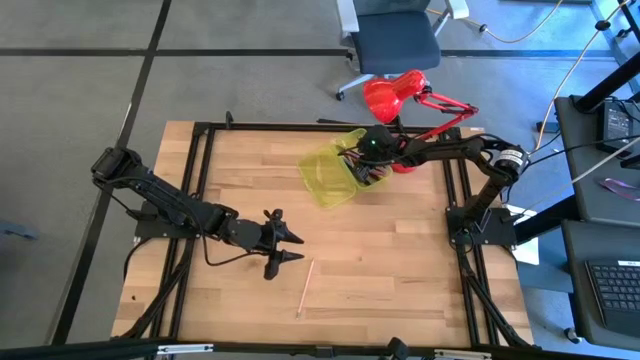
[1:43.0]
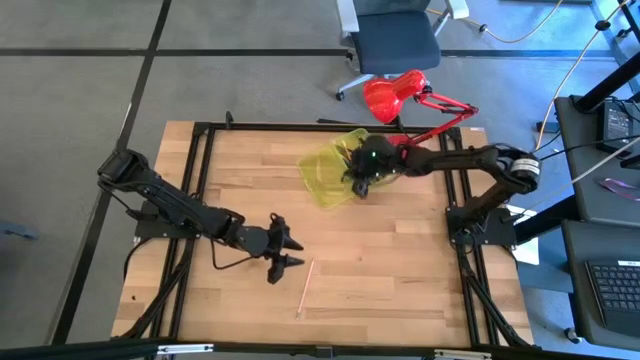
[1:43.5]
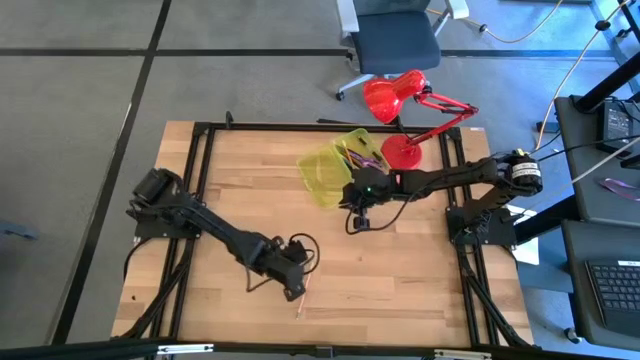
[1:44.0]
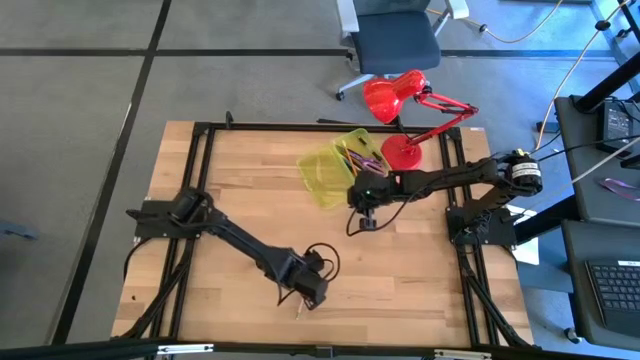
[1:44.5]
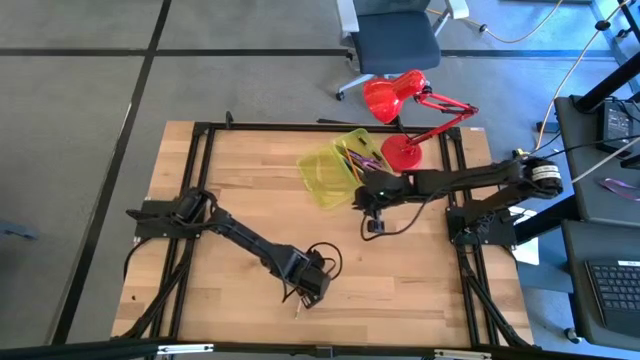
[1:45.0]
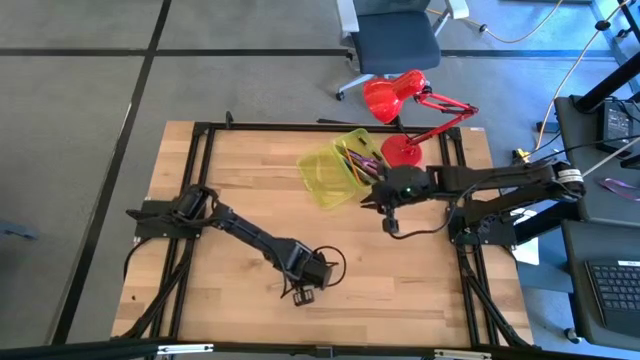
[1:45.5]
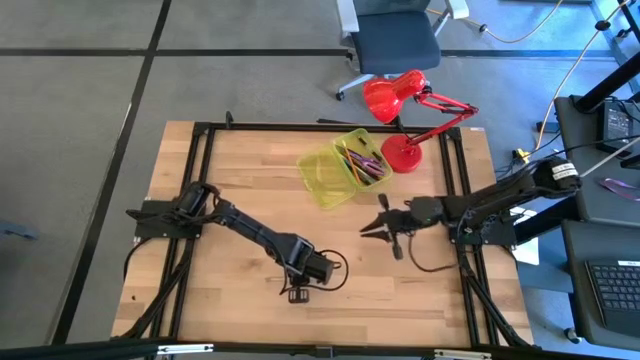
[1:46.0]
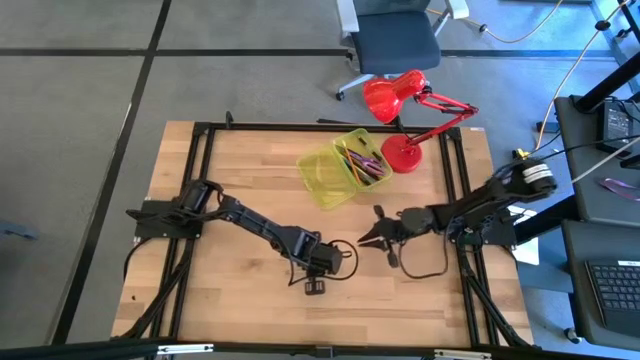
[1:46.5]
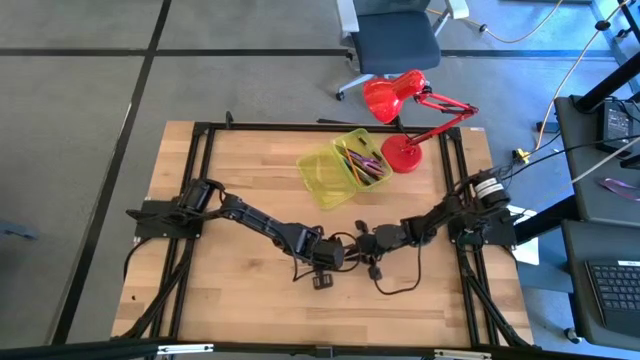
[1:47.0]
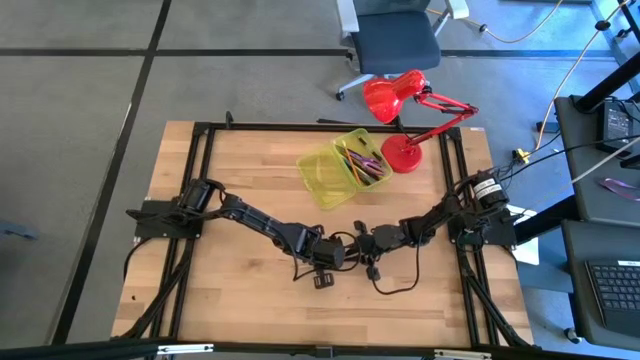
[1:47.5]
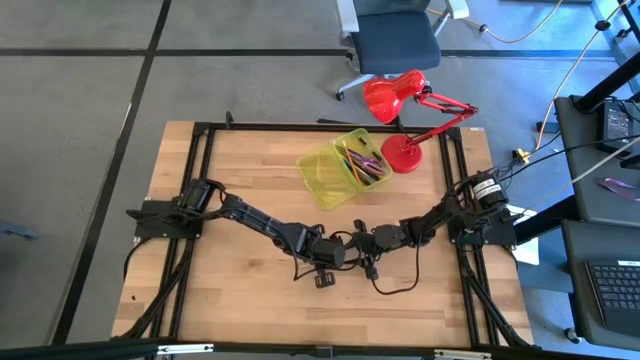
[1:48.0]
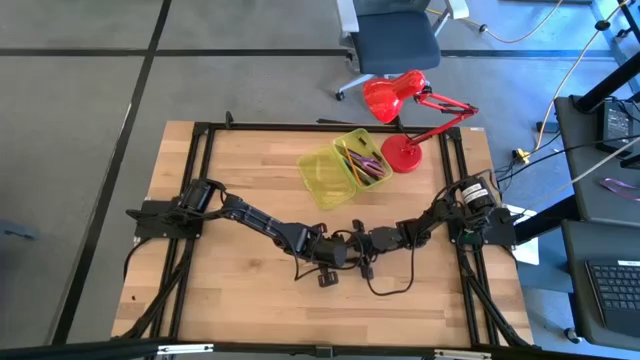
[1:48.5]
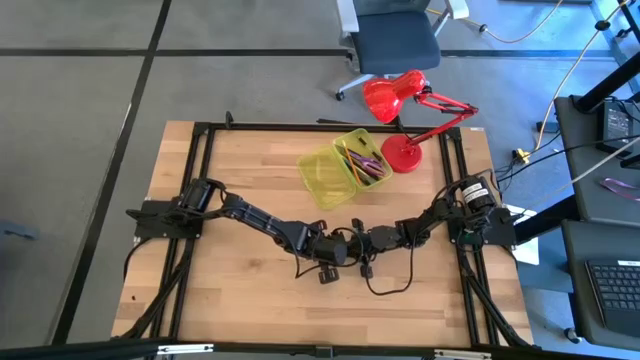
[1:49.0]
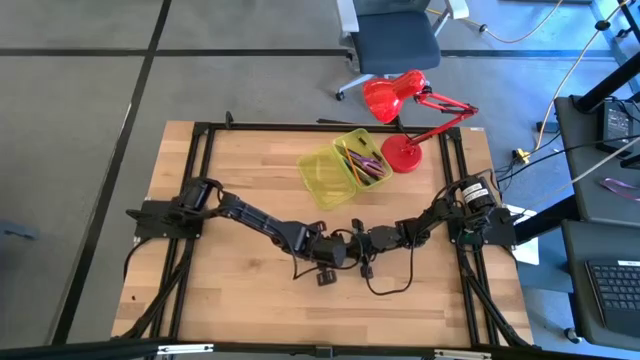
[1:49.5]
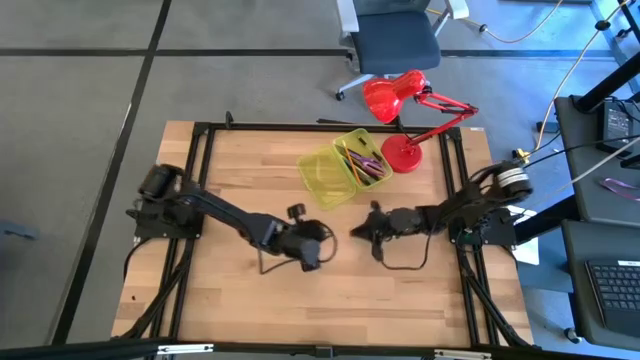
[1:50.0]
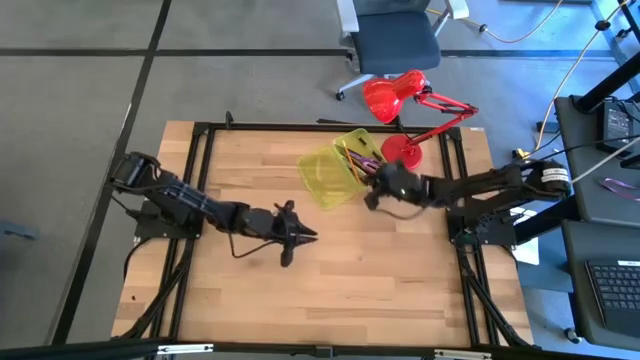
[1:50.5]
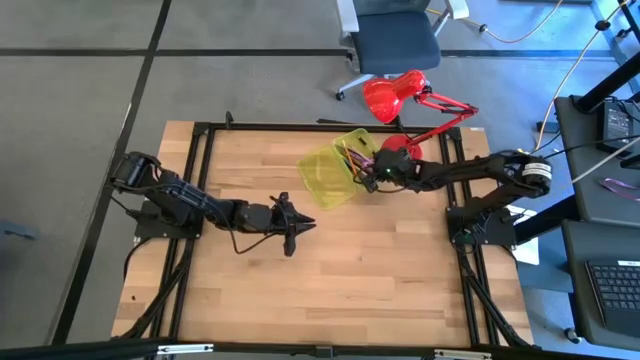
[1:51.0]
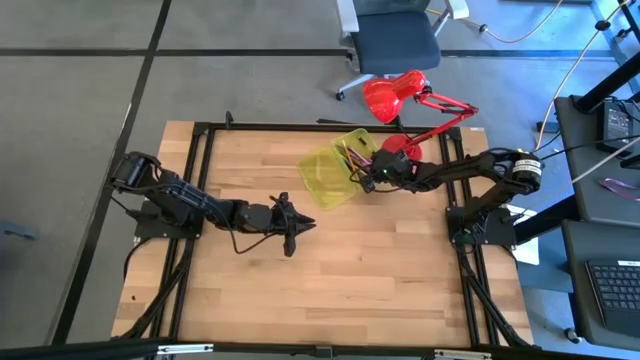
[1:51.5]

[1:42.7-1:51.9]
Task: Pick & place school supplies into a supply box
Put the pink pencil into the yellow supply box

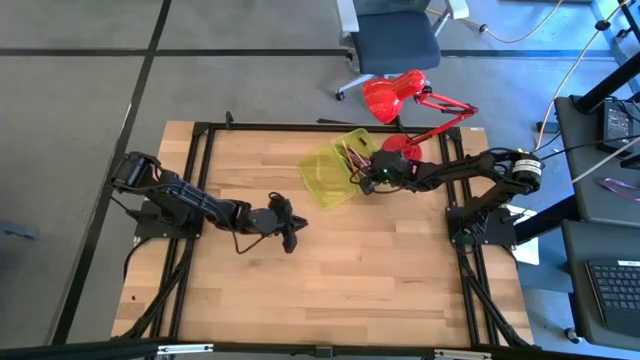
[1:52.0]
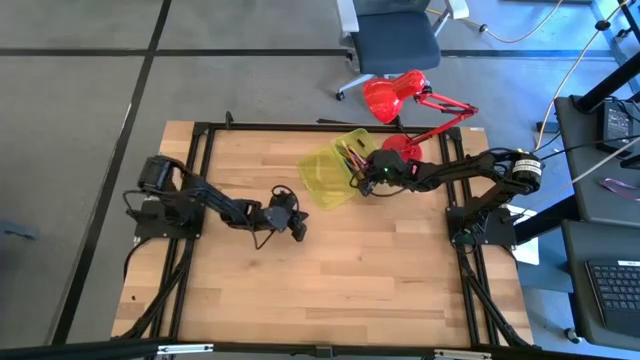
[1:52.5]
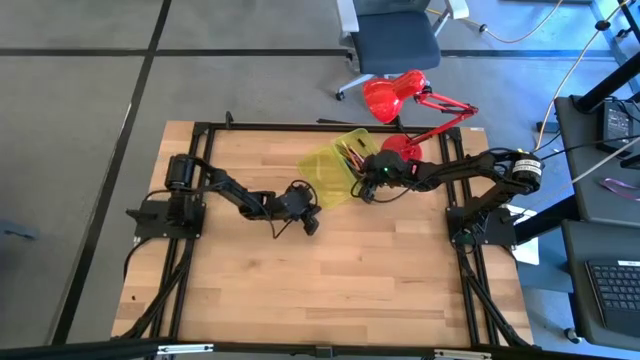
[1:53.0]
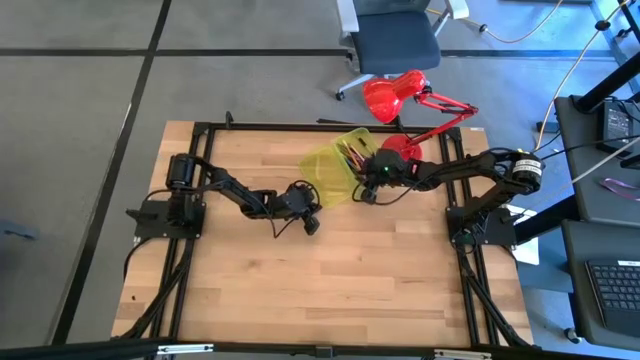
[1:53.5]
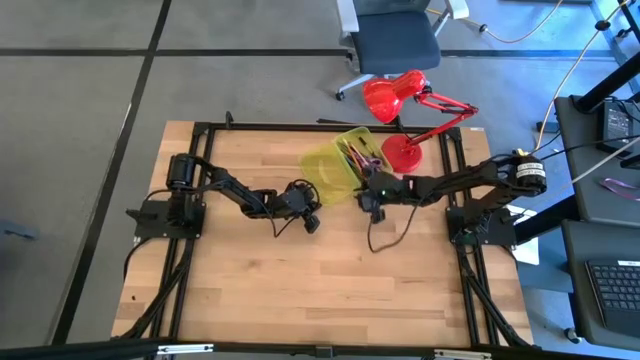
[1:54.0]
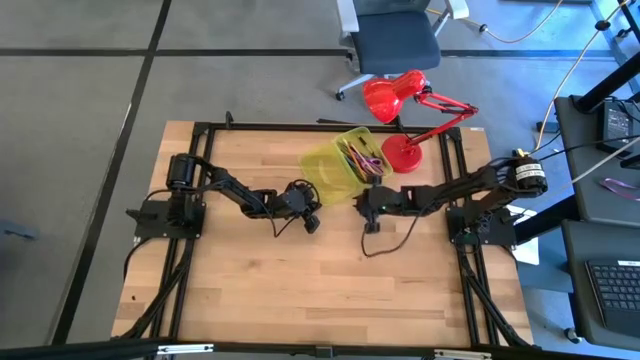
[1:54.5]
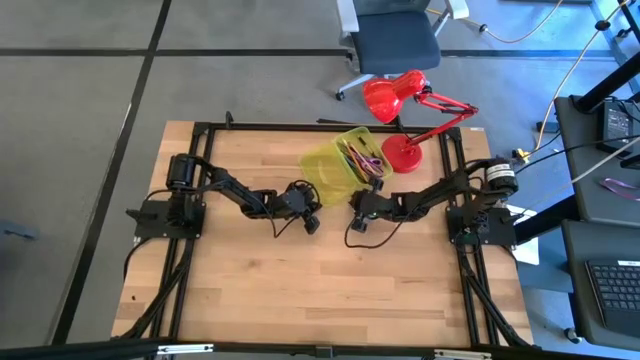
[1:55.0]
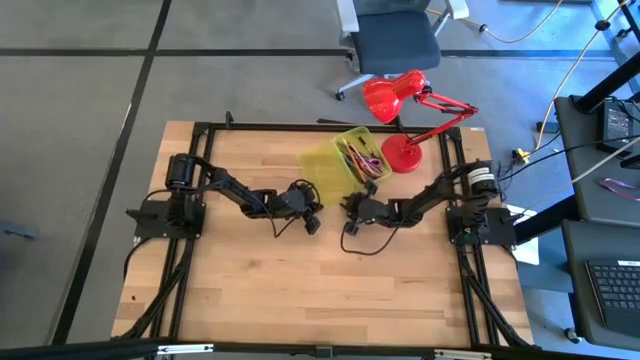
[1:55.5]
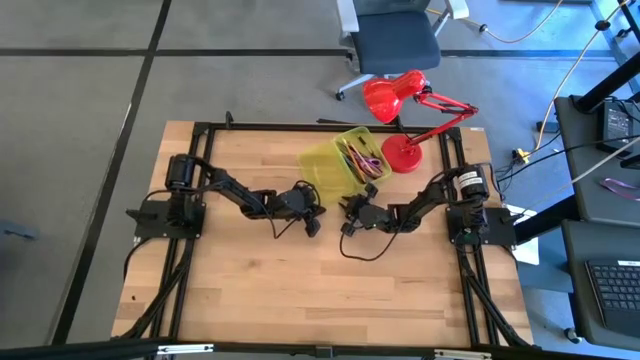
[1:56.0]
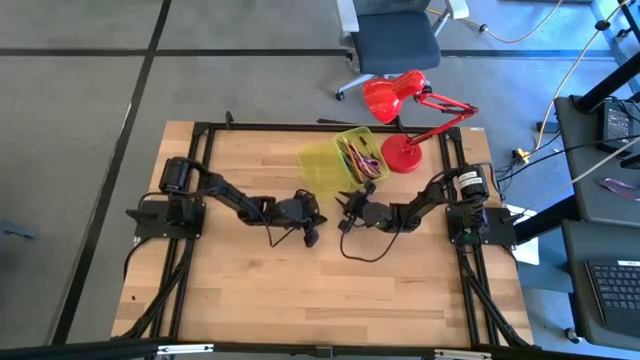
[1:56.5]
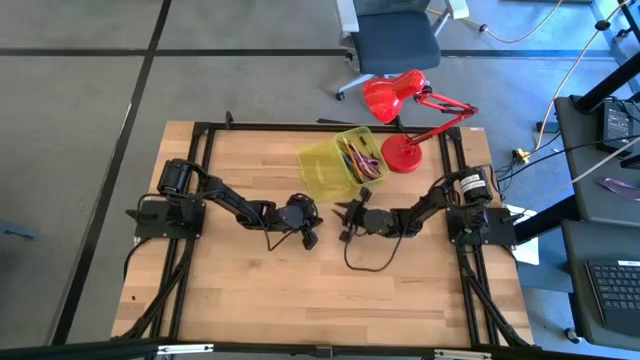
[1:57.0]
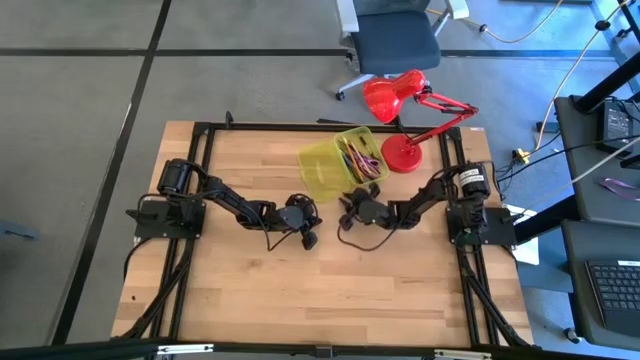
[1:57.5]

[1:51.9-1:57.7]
Close the yellow supply box

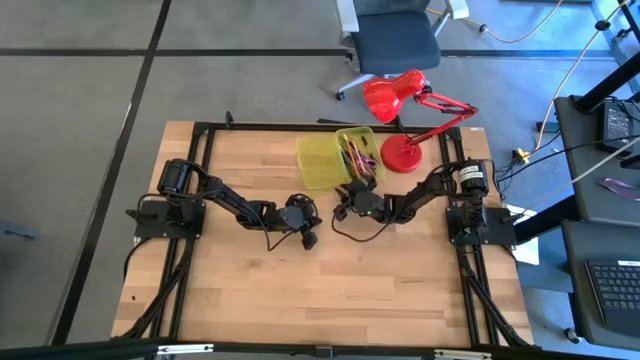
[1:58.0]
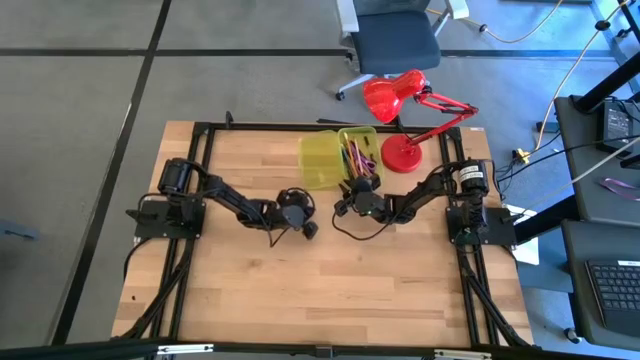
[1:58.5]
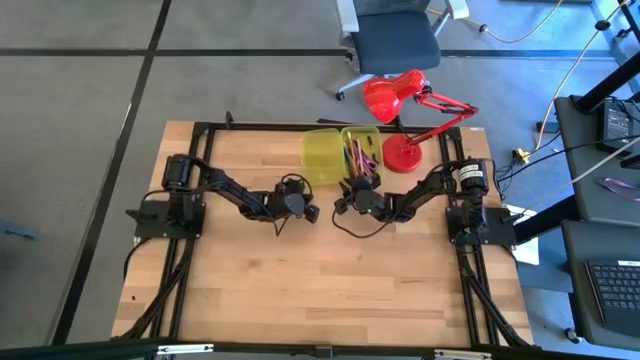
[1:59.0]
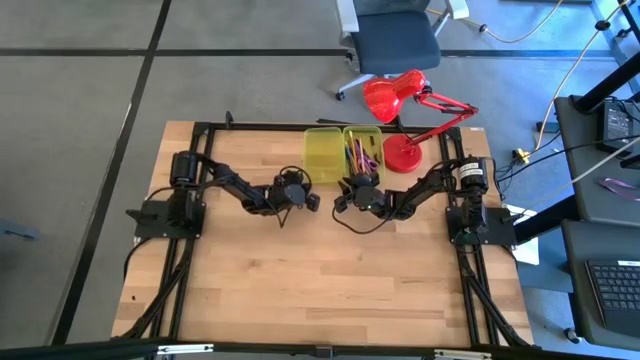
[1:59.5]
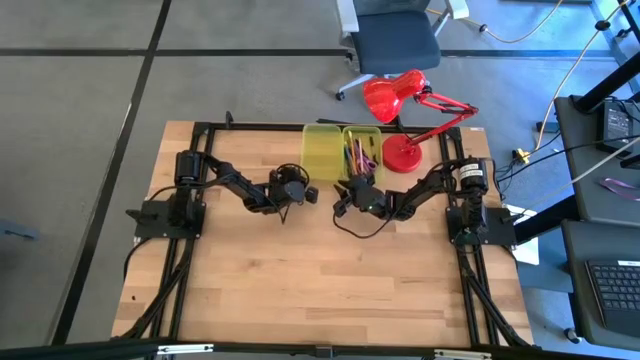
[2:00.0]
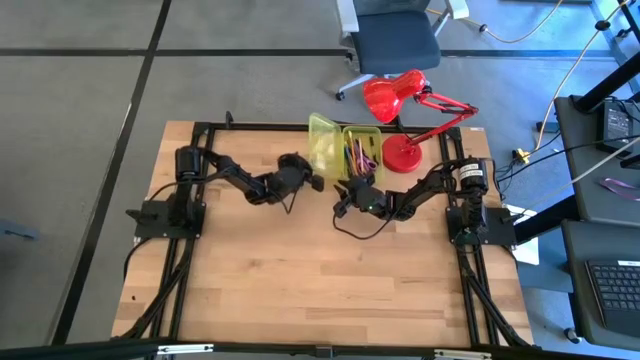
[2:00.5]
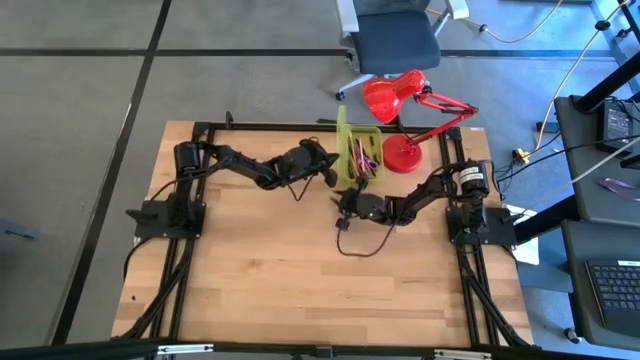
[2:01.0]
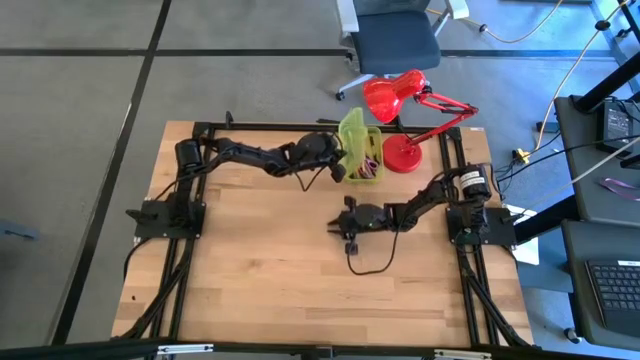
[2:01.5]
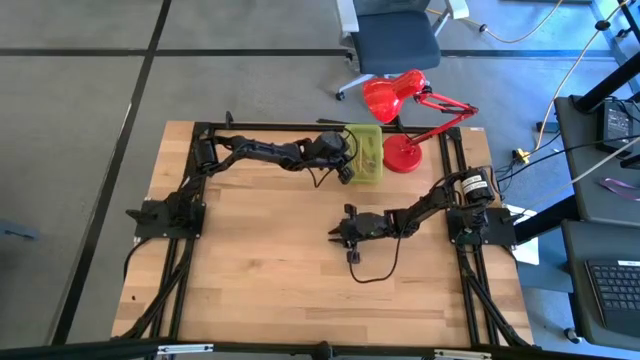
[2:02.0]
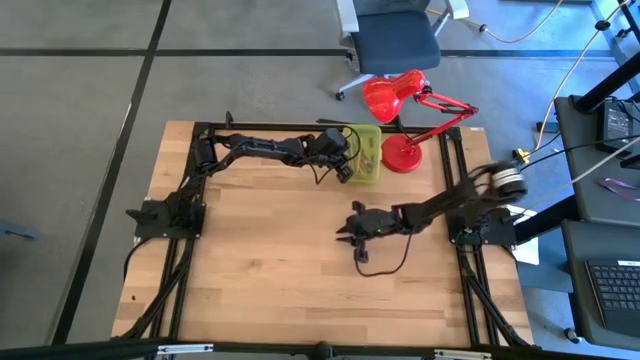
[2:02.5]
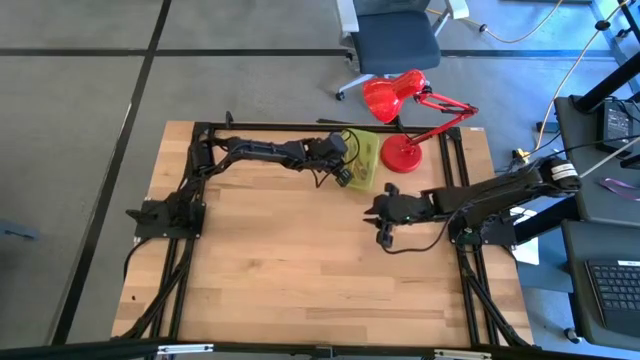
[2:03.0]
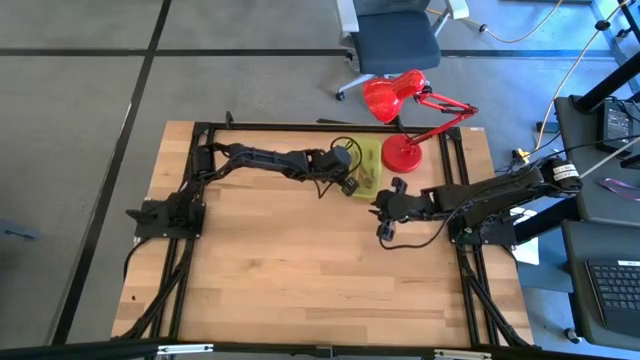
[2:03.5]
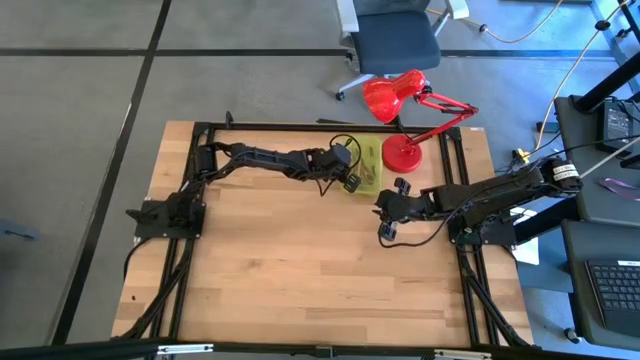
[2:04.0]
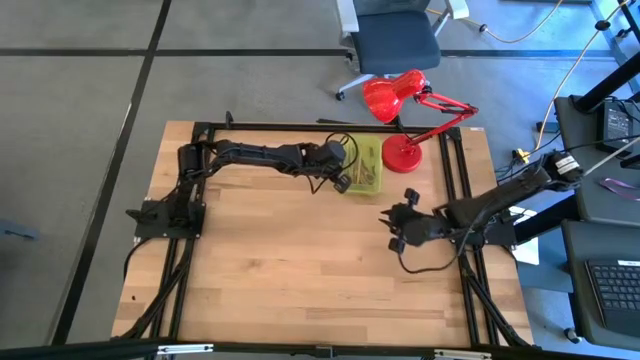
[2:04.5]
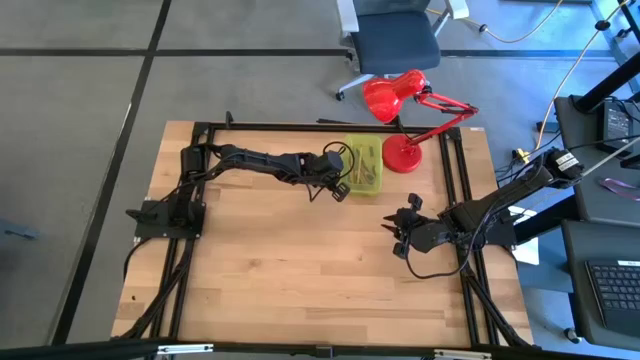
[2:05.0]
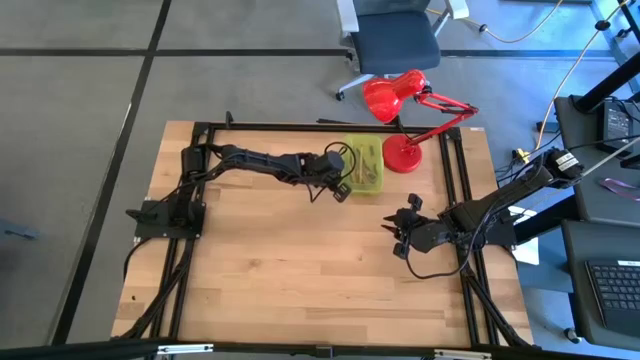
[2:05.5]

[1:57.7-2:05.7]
Close the yellow supply box
